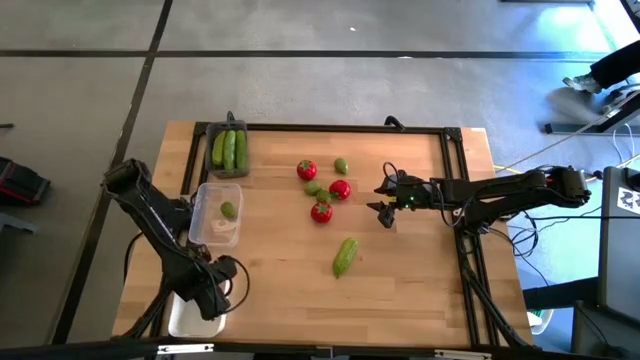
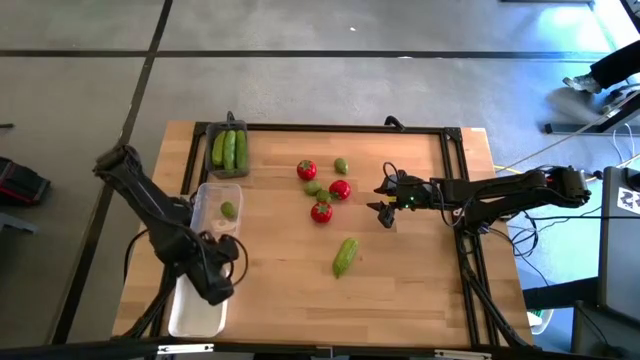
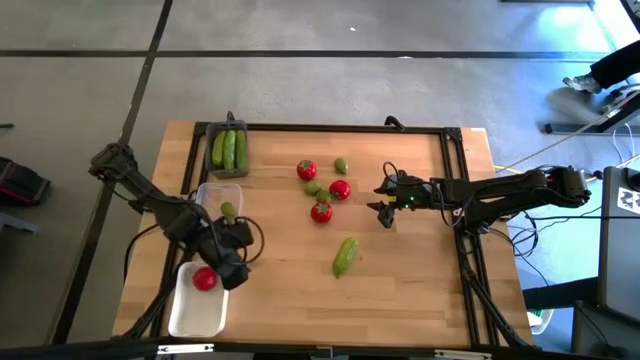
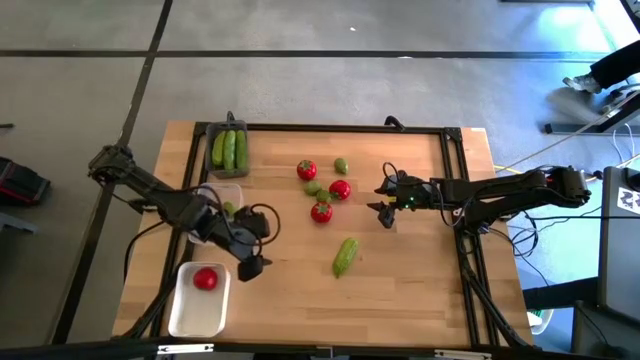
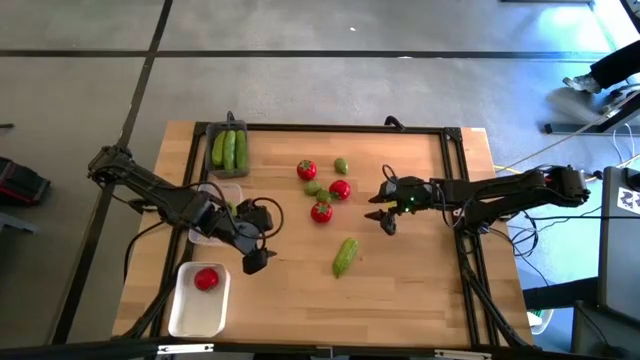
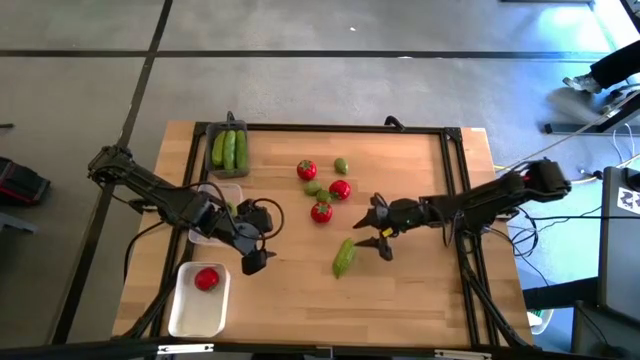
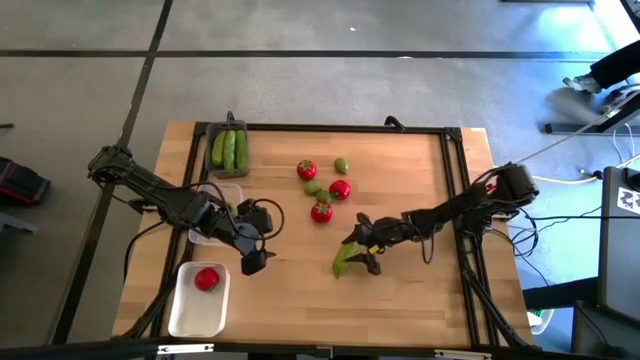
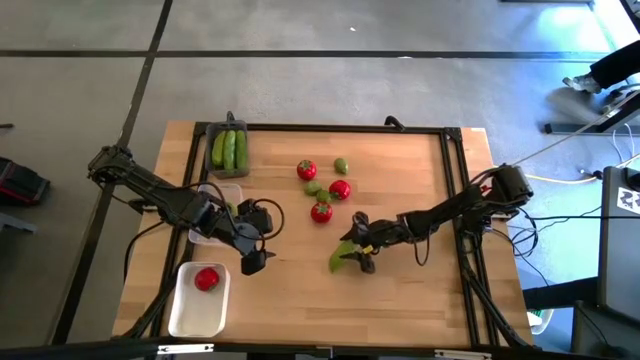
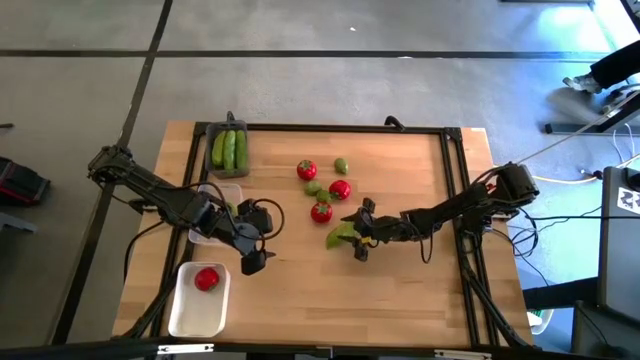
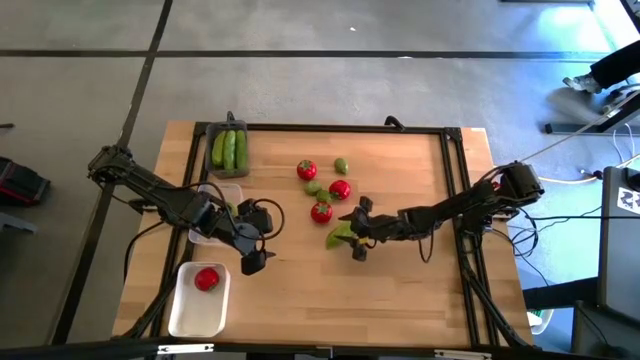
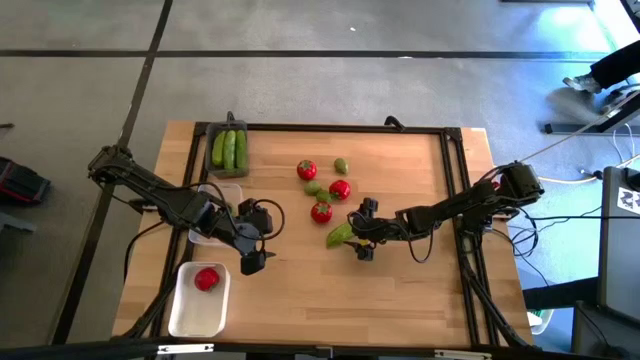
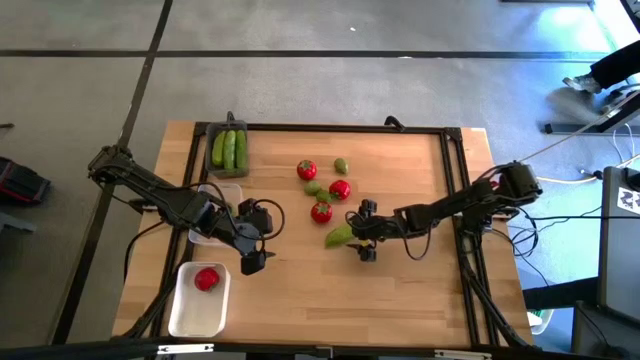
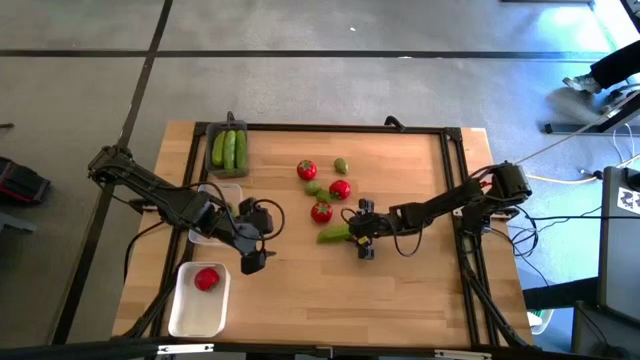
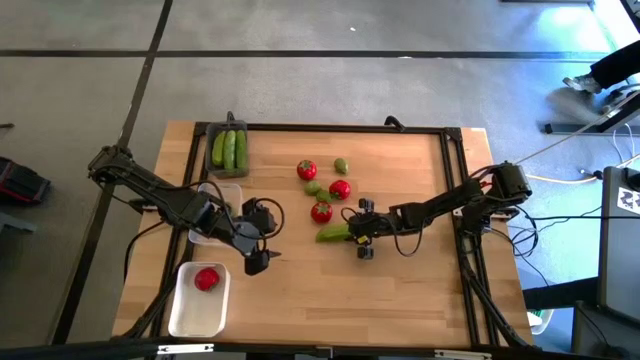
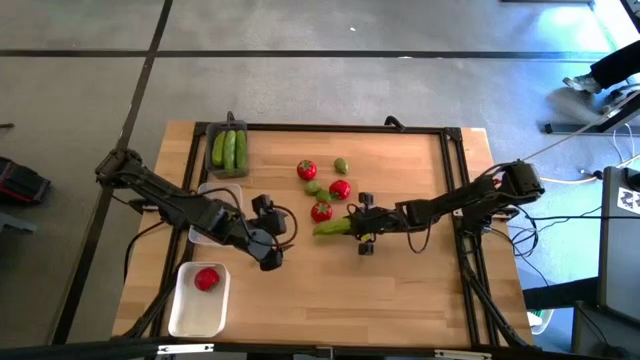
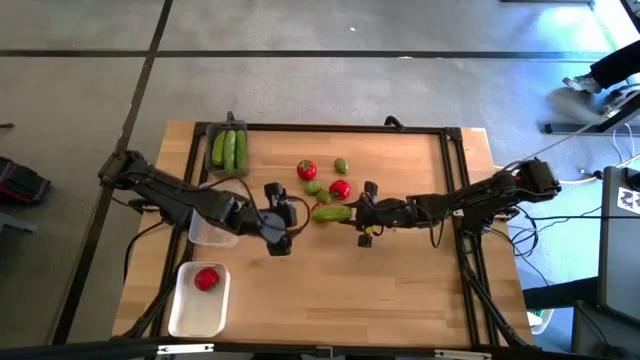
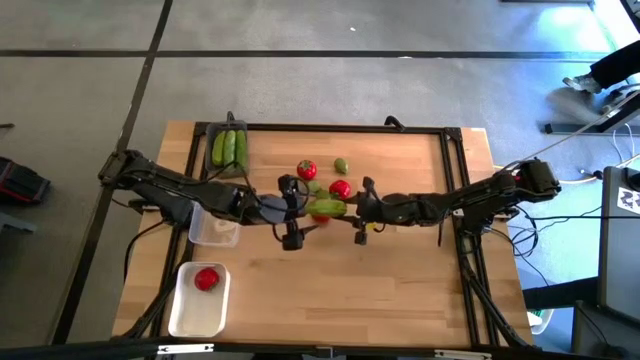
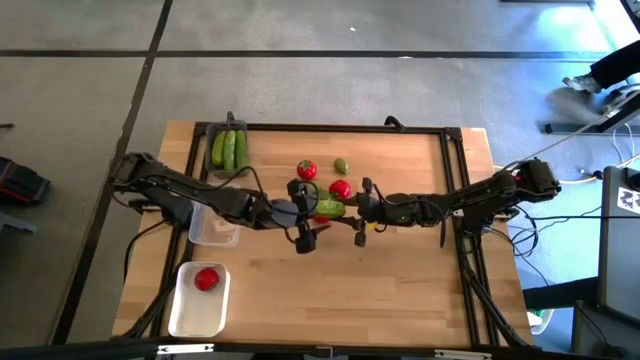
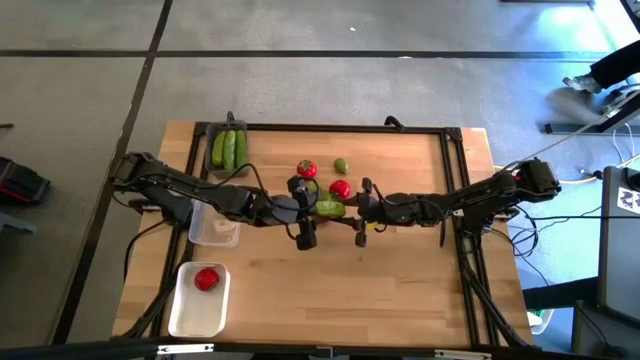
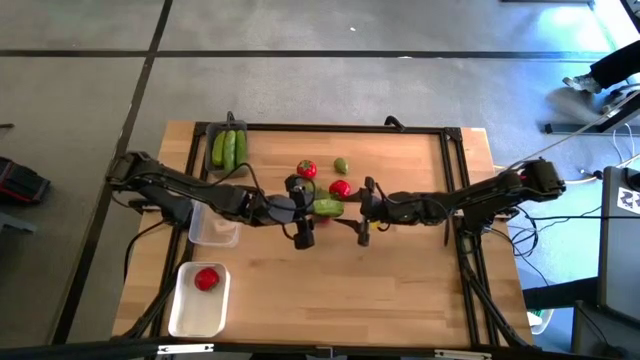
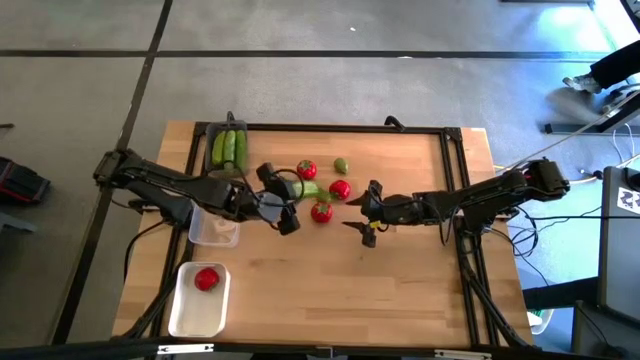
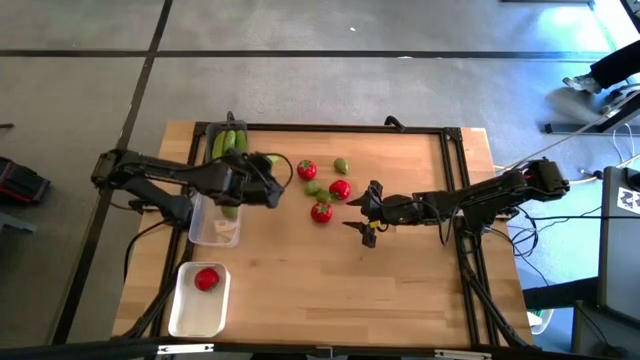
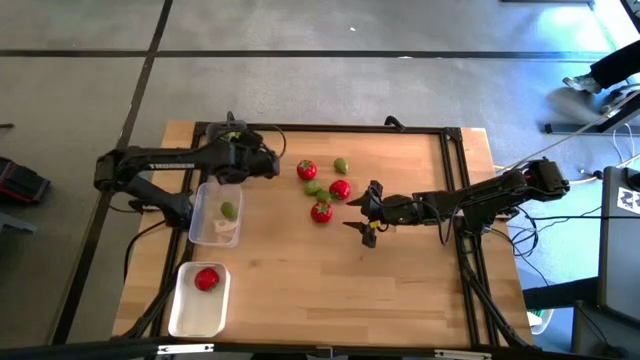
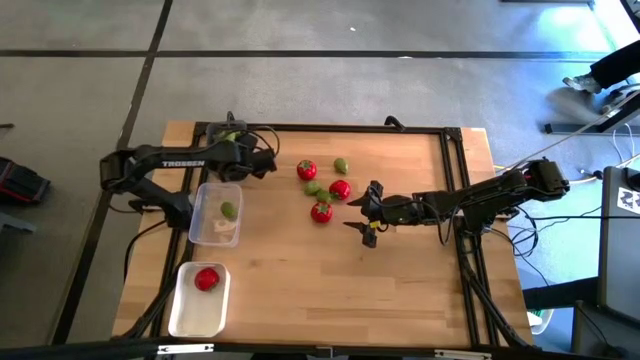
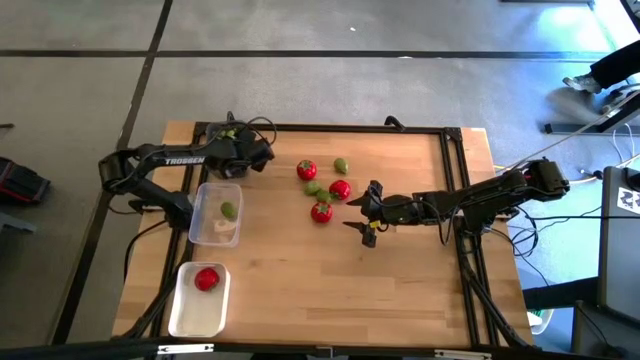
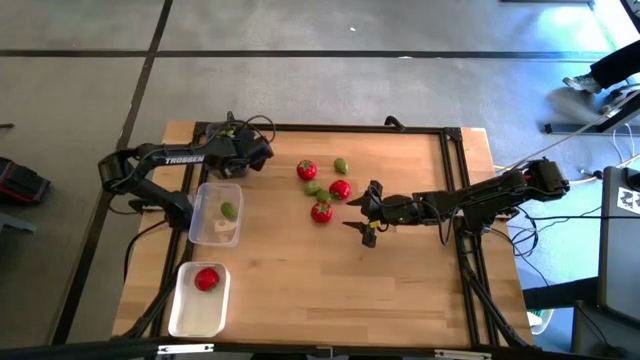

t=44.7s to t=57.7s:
Task: Sort produce into baskets
Put the cucumber into the black bin

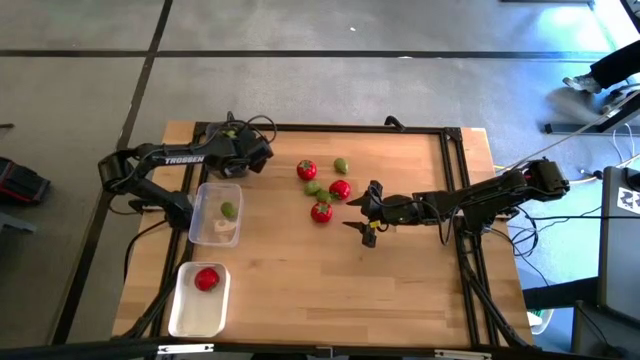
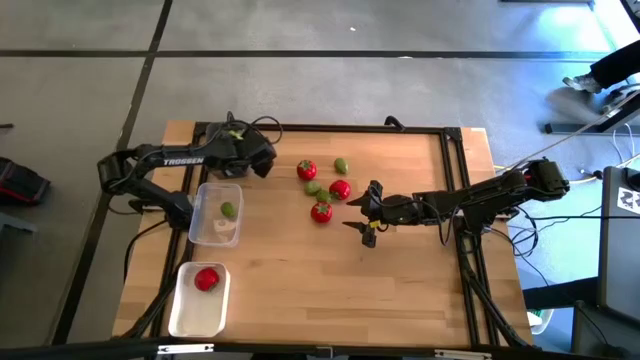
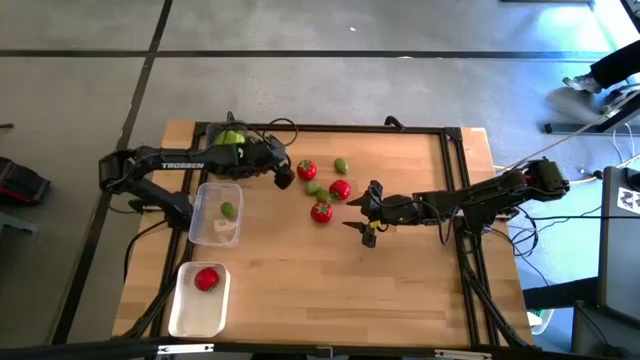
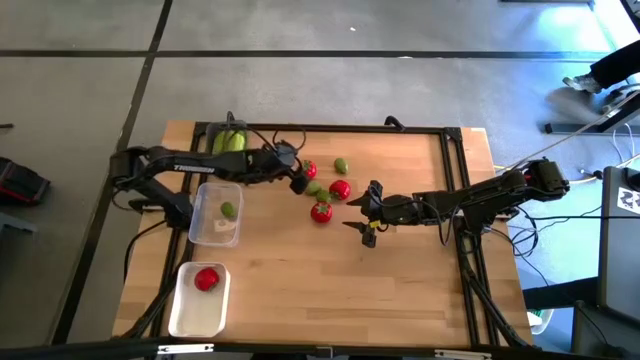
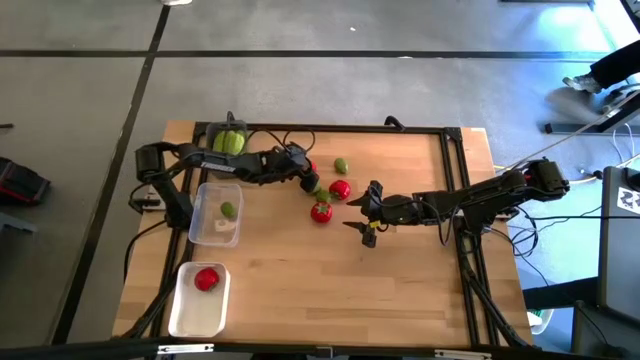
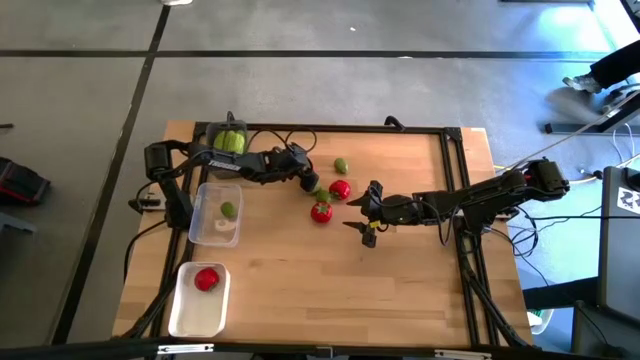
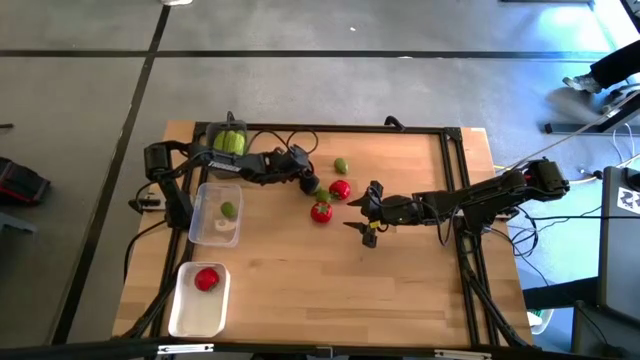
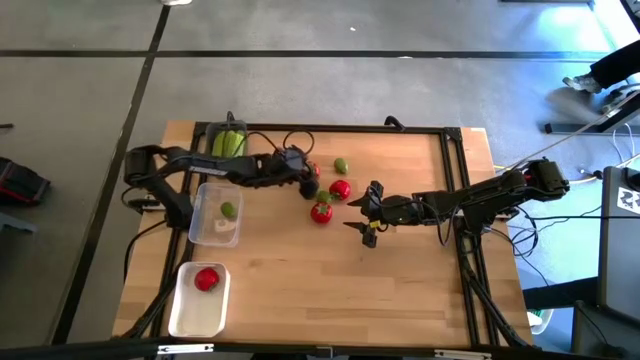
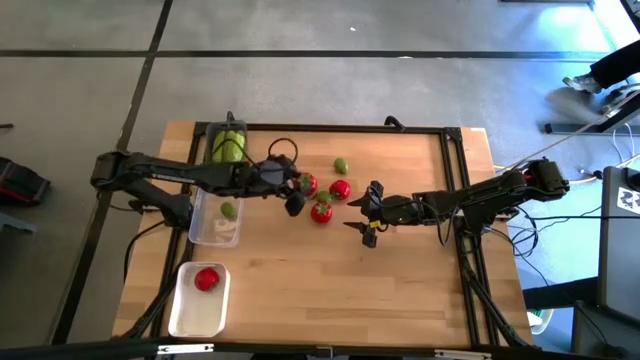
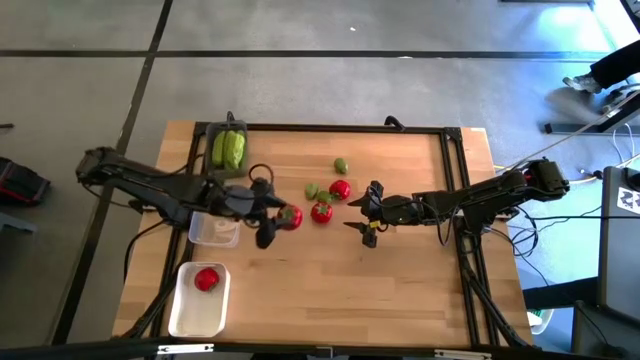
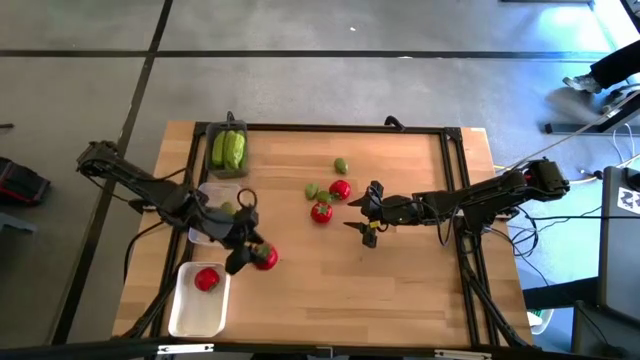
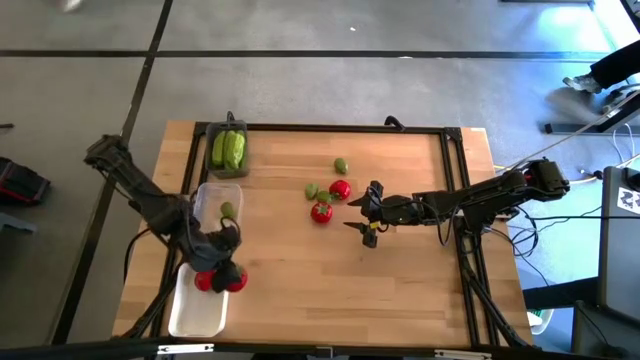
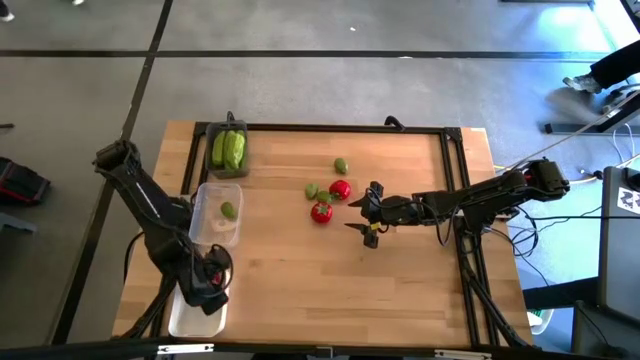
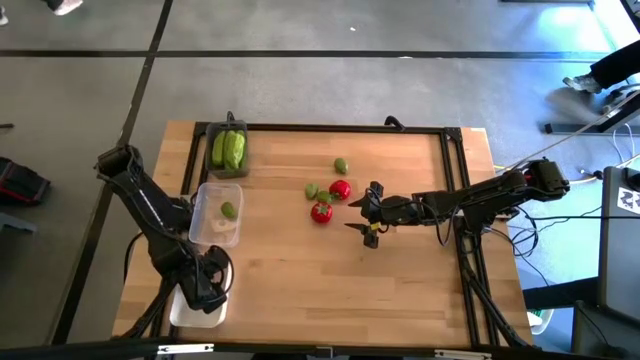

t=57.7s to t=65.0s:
Put the tomato into the white bin

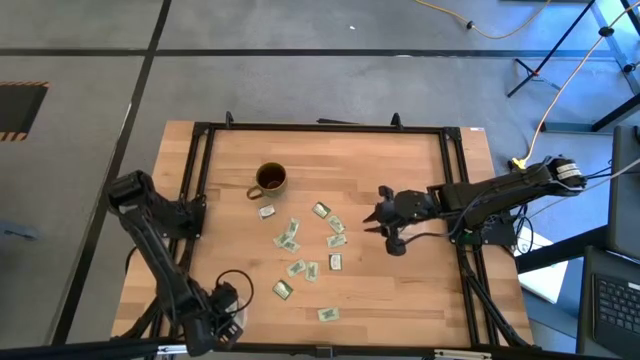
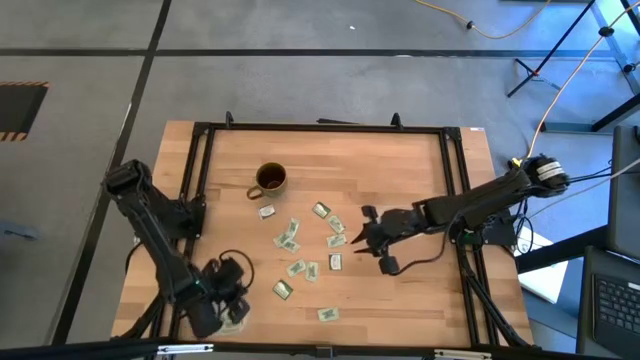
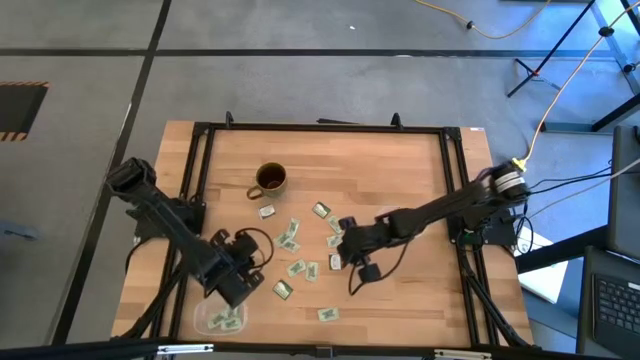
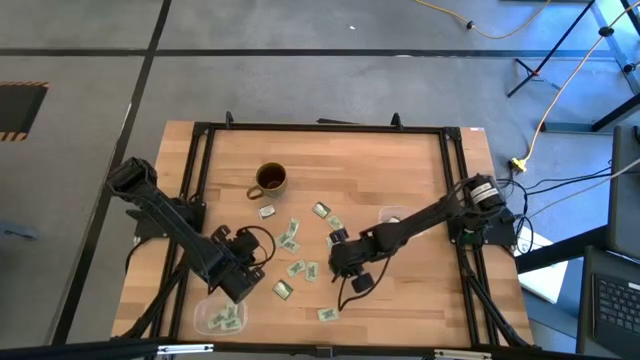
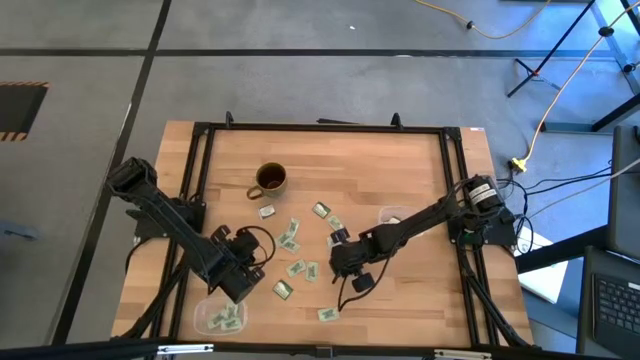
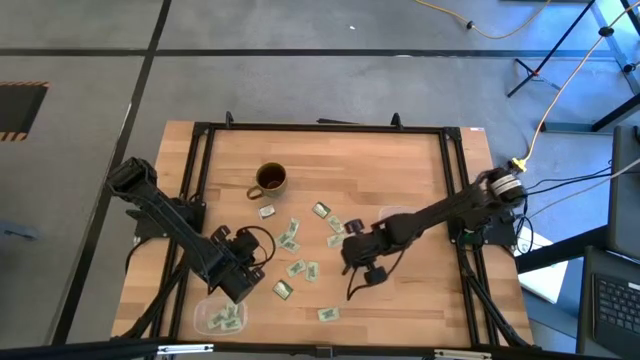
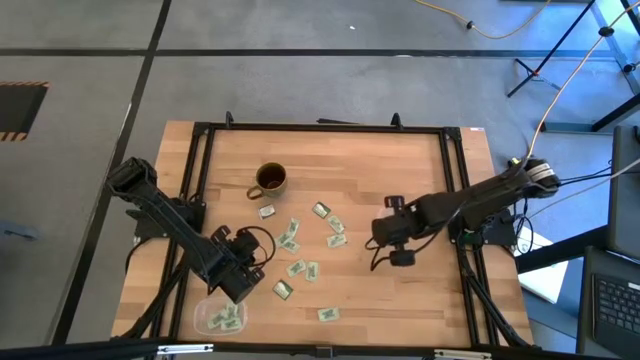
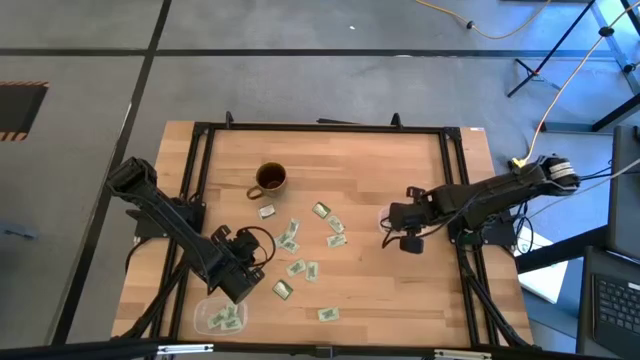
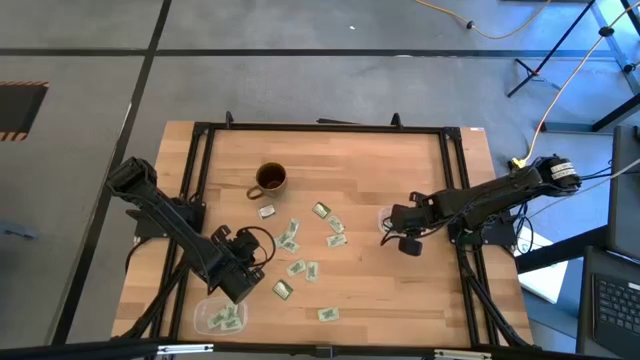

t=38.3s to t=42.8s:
Task: Pick and place Stevia / Truvia into bins
Put the truvia packet into the top transparent container
